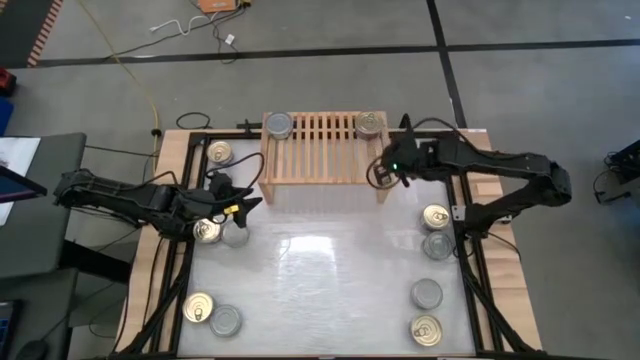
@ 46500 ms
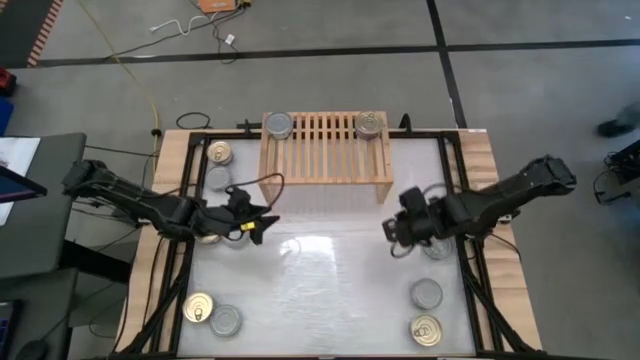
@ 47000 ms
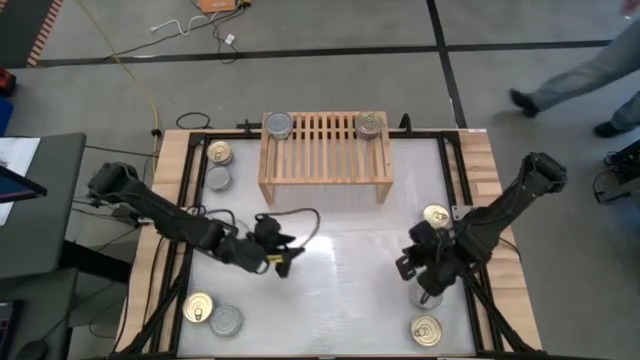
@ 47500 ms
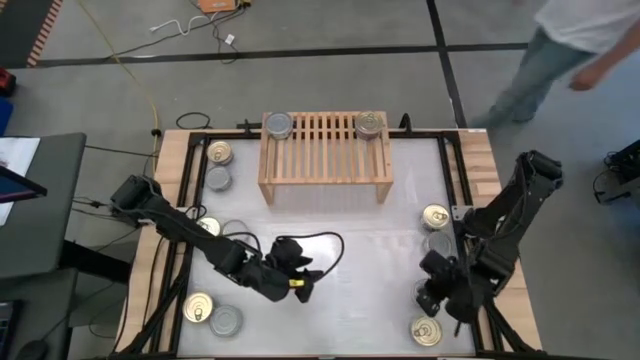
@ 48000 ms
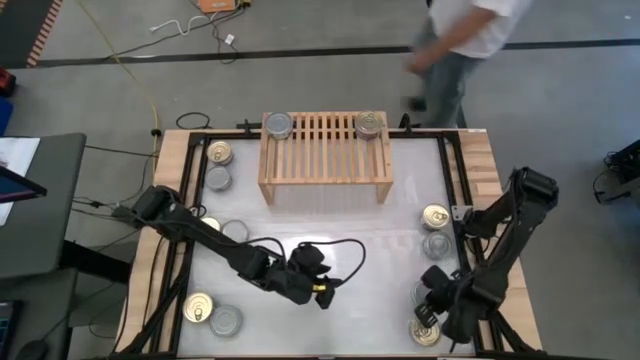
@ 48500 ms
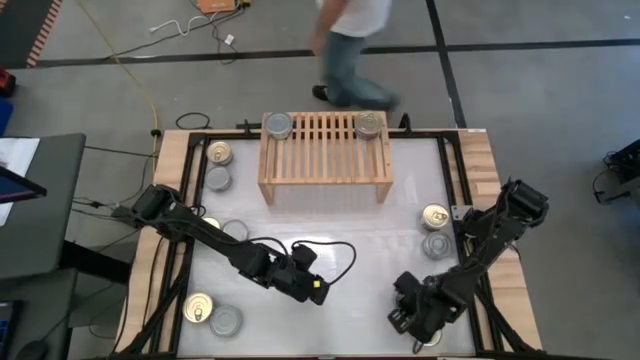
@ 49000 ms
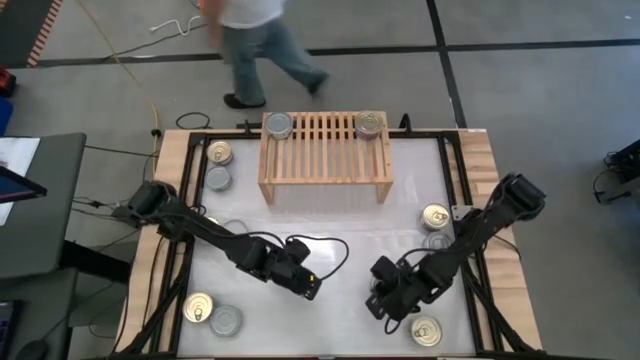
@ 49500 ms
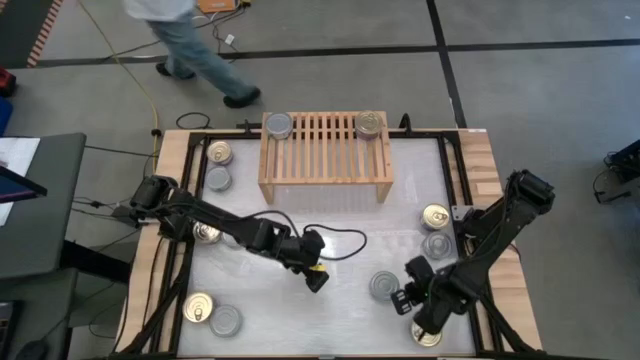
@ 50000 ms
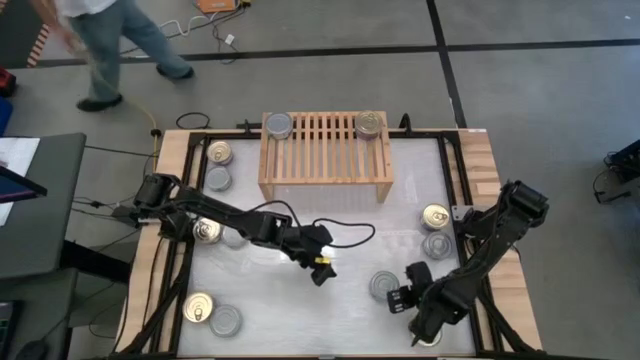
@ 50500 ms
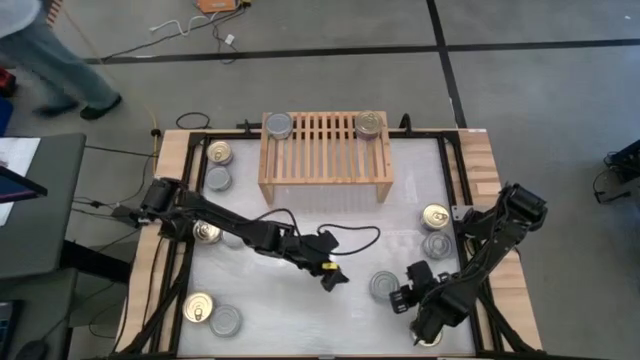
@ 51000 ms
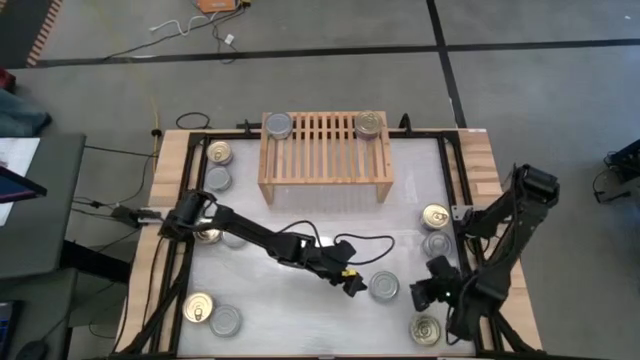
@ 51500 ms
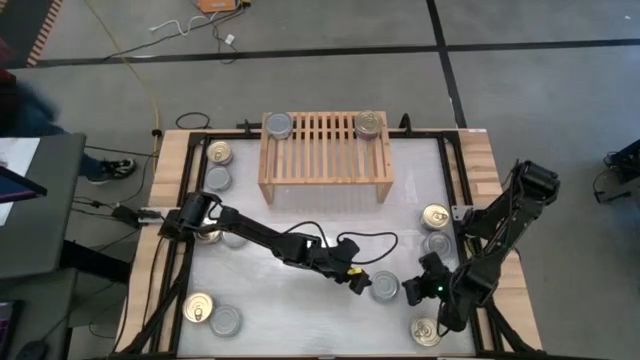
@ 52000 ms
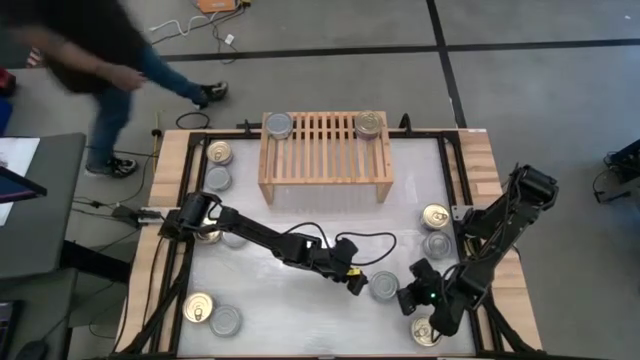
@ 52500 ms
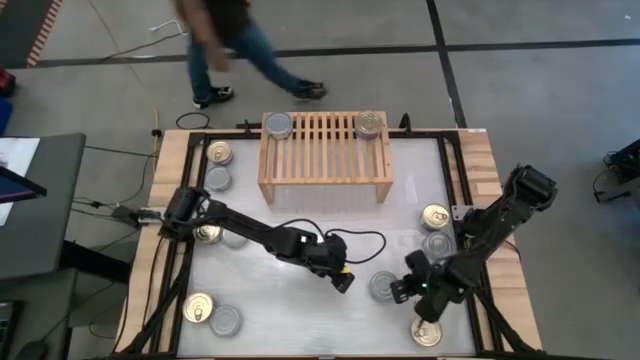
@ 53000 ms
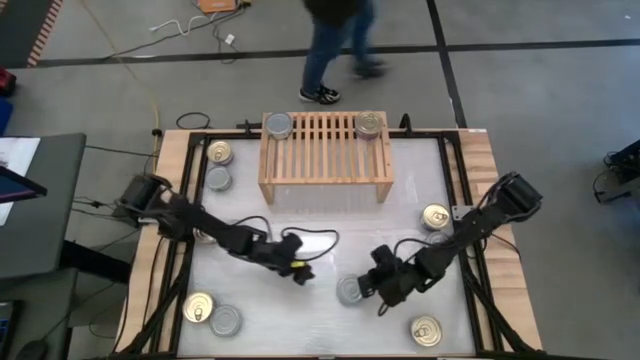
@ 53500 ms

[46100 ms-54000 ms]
Task: Stack canned seafood by type on shelf
Move the green tuna can to the center of the table

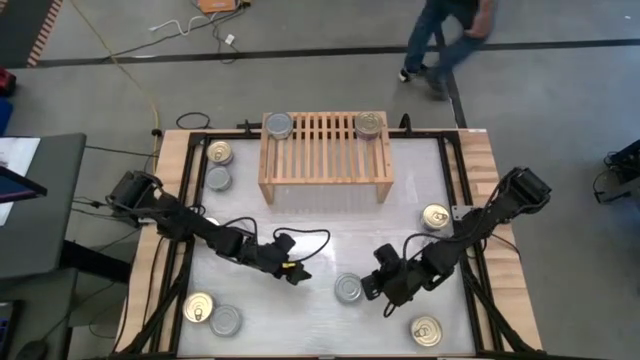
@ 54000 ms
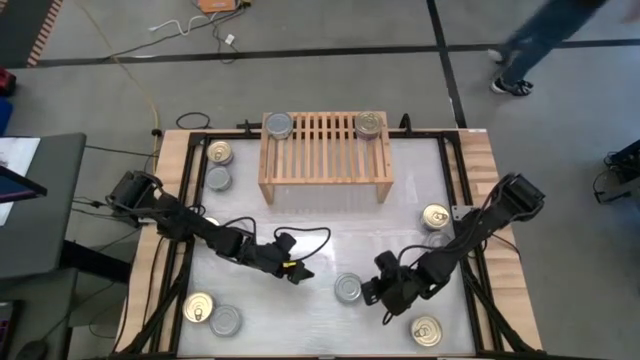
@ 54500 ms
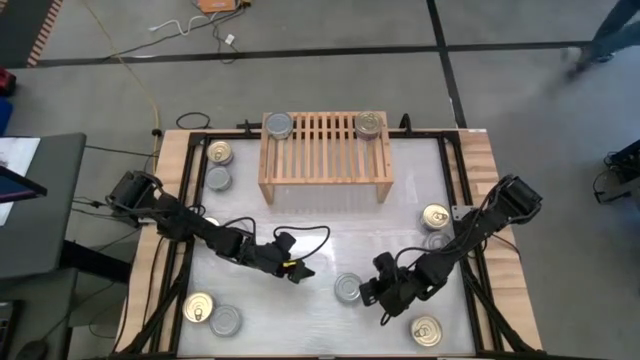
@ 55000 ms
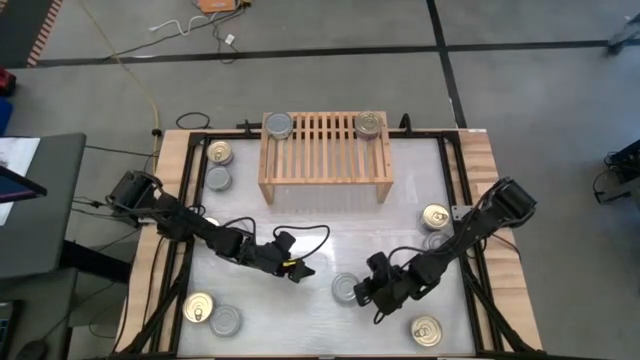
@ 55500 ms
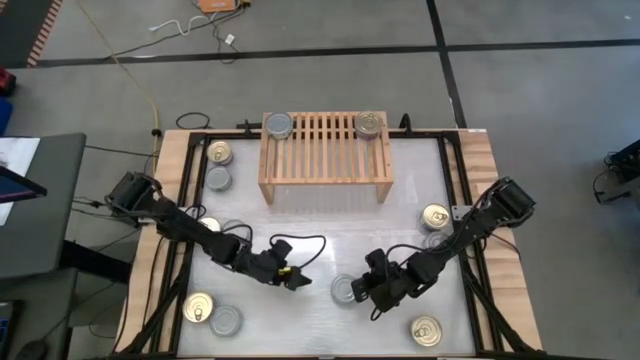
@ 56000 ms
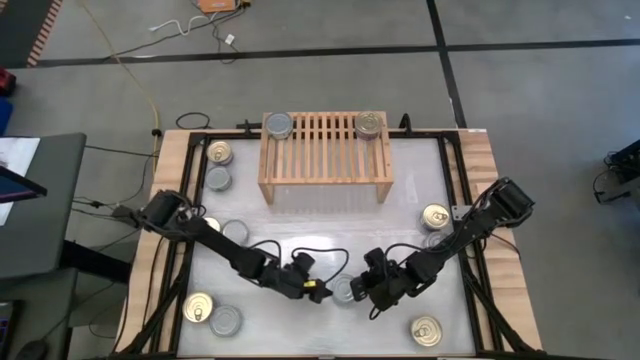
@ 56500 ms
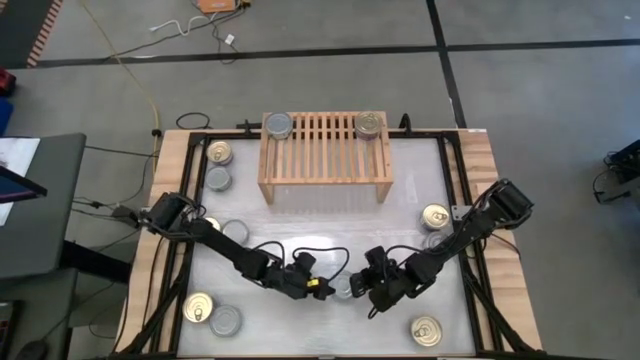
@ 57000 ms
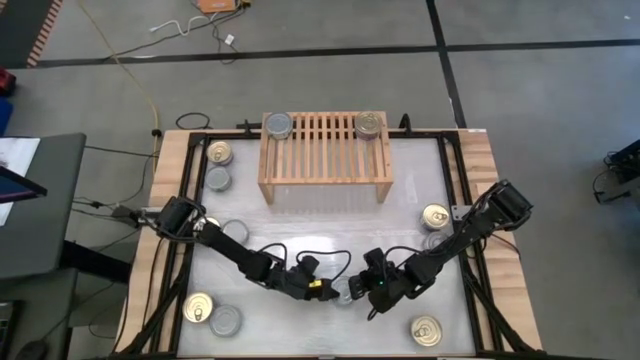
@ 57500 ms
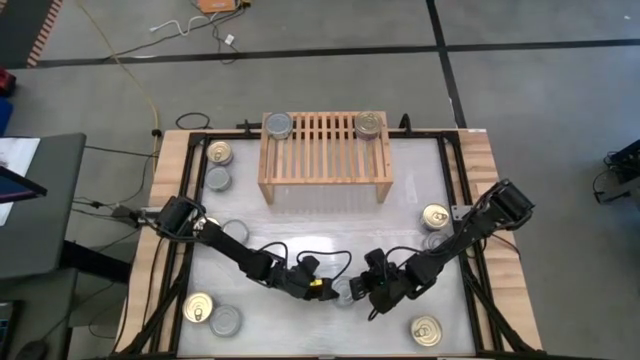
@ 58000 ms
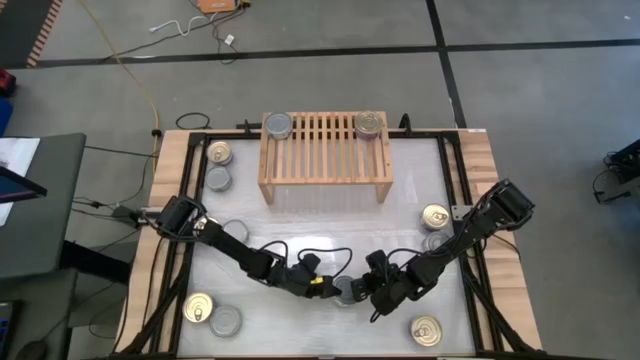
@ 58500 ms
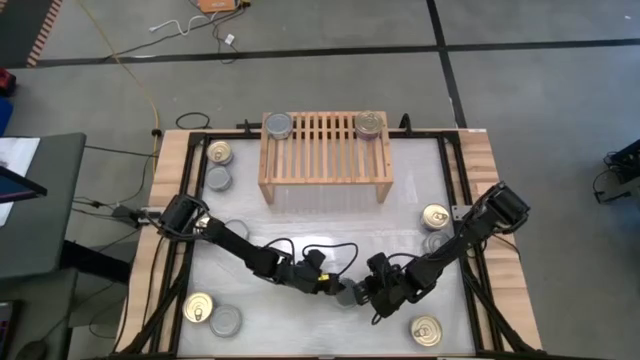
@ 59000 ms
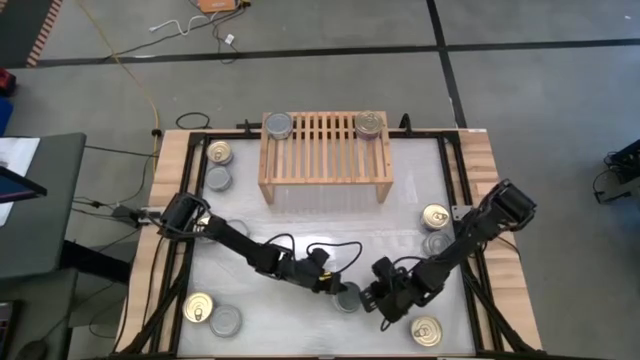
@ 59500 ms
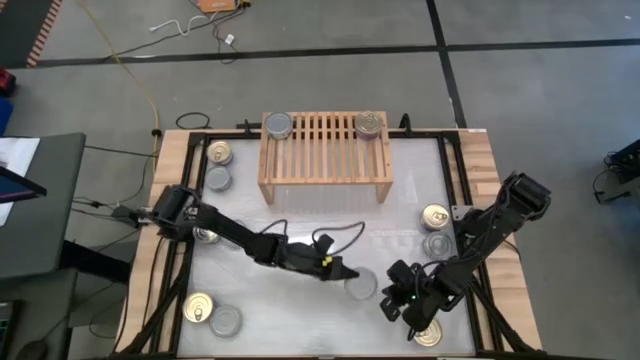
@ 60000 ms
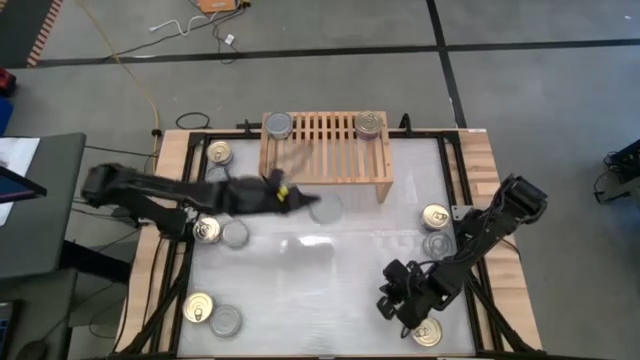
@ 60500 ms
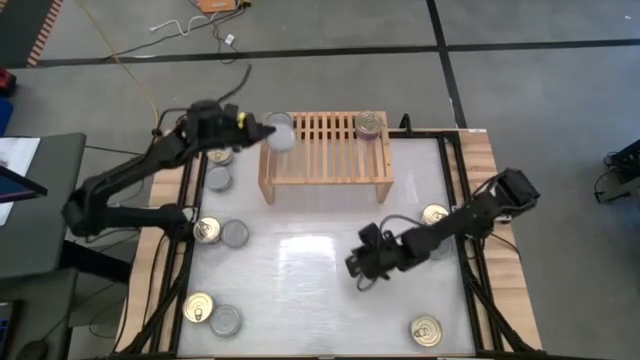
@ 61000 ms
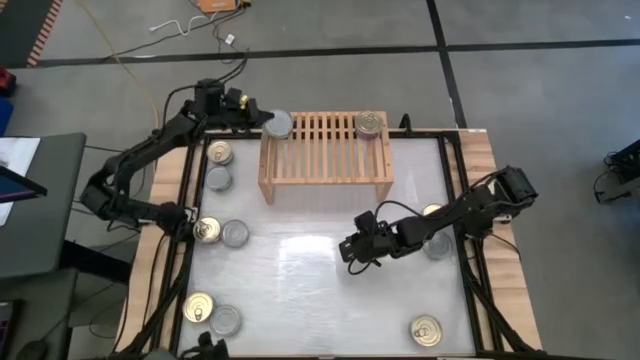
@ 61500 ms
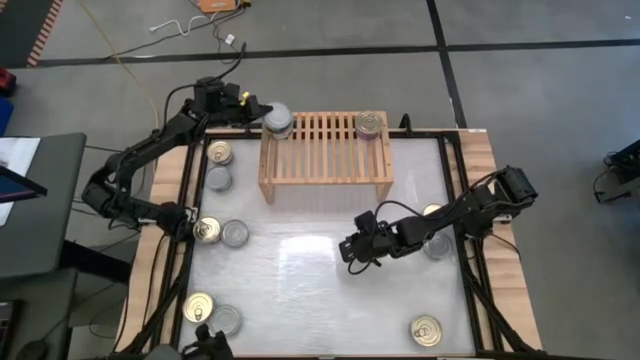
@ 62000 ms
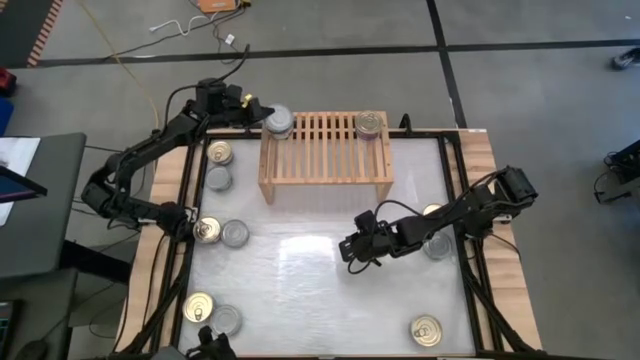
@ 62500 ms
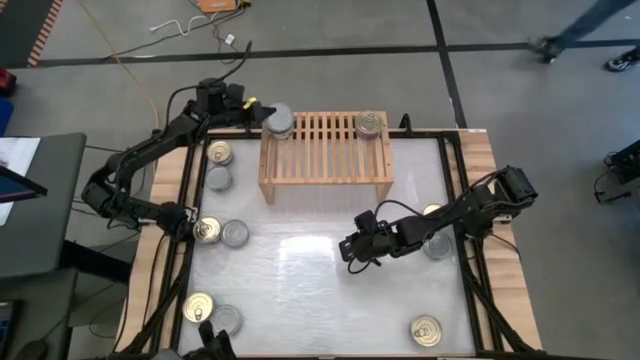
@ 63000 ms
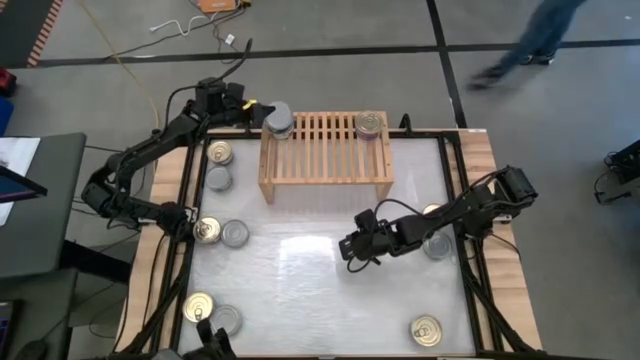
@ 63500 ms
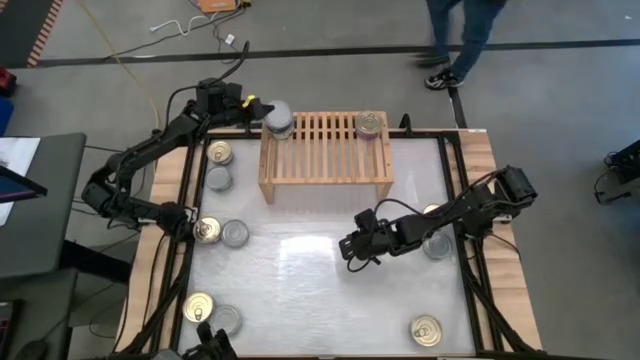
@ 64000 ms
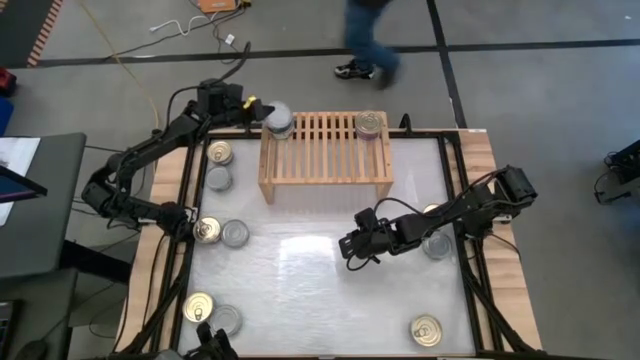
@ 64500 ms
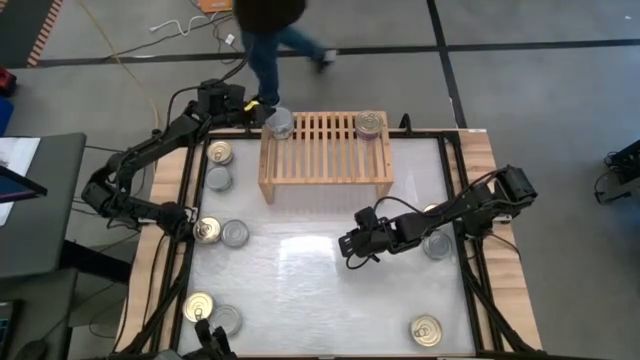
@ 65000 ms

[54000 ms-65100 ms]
Stack the green tuna can on top of the green tuna can on the shelf

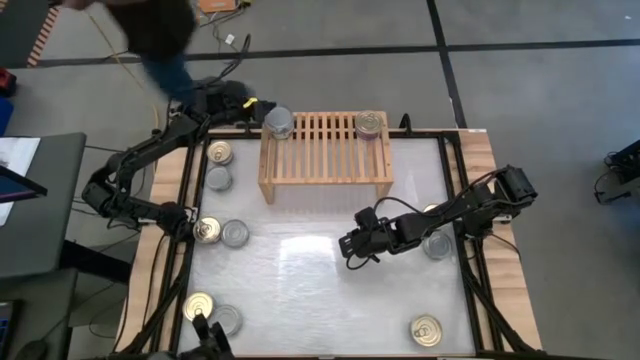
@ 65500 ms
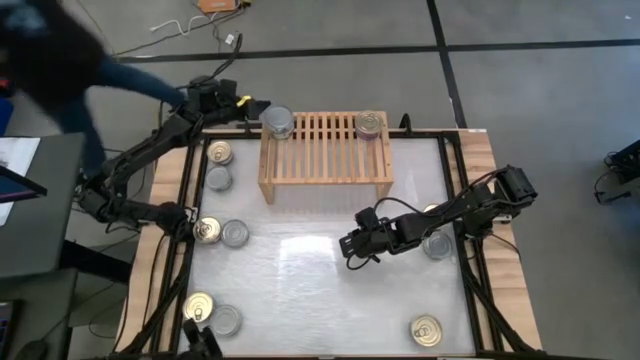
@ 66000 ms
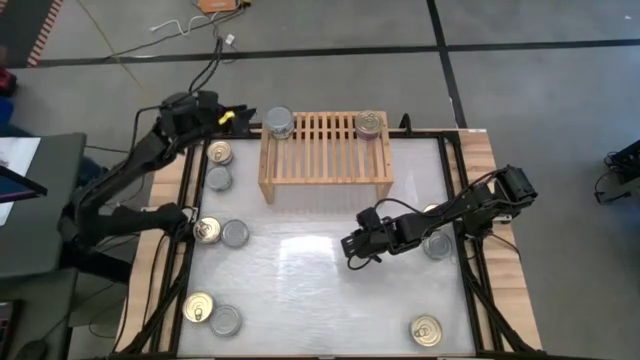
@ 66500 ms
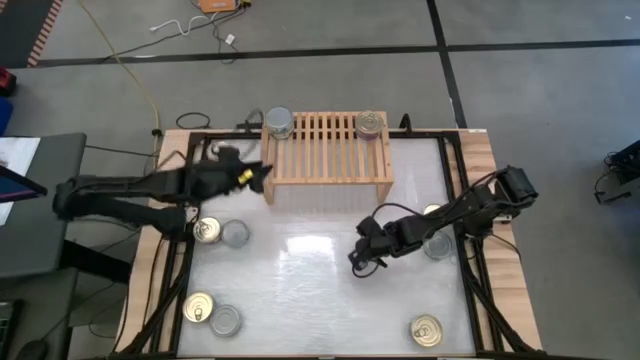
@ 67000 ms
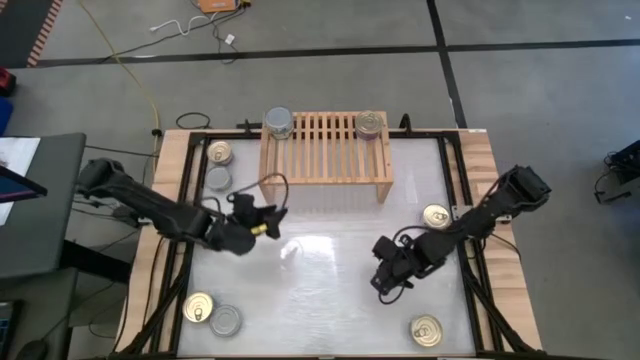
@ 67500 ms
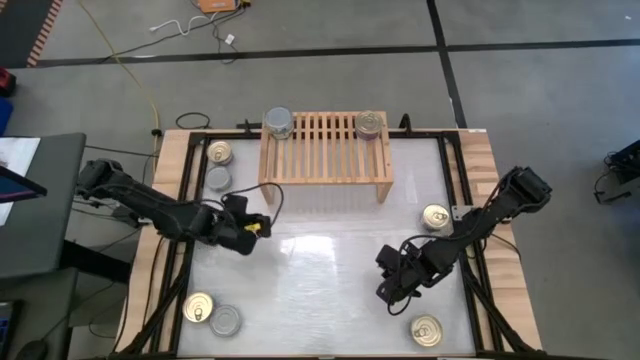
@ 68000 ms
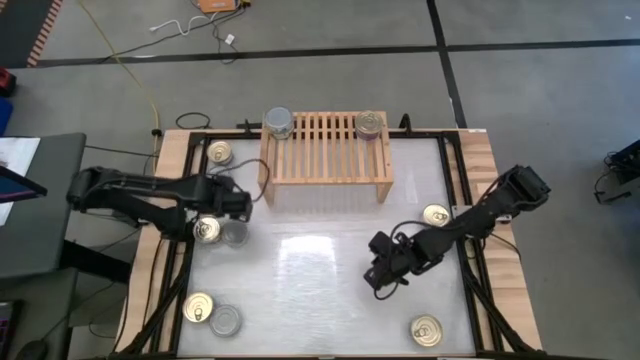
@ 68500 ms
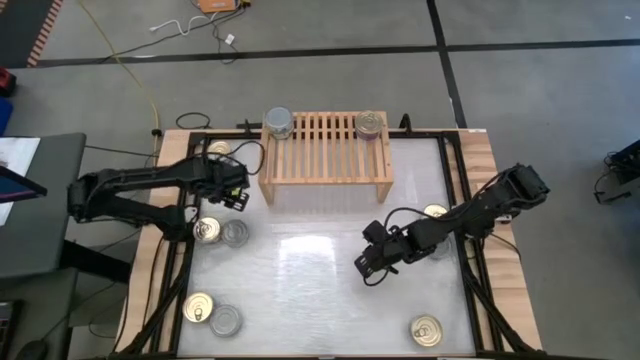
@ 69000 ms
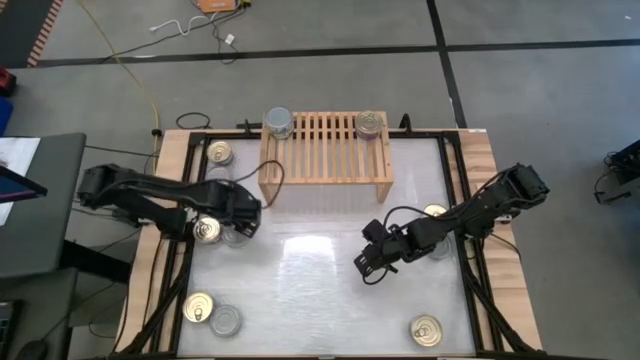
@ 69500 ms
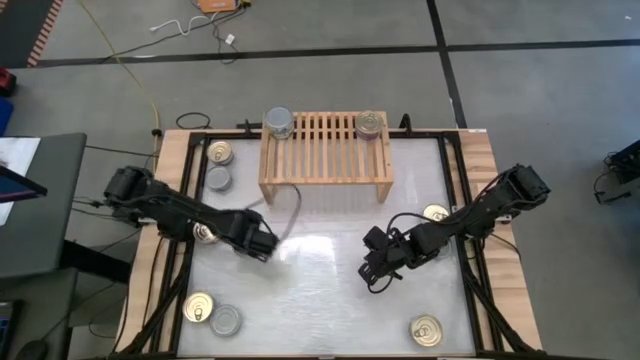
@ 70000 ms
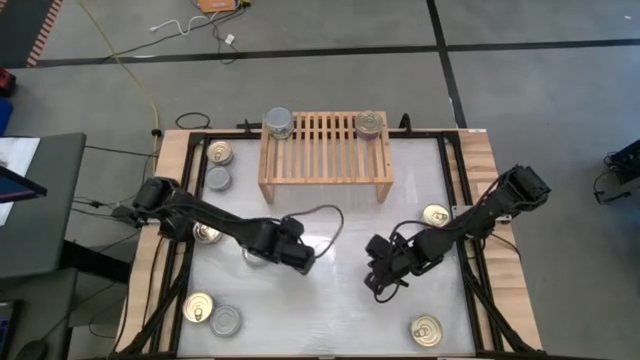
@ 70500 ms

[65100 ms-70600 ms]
Move the green tuna can to the center of the table
